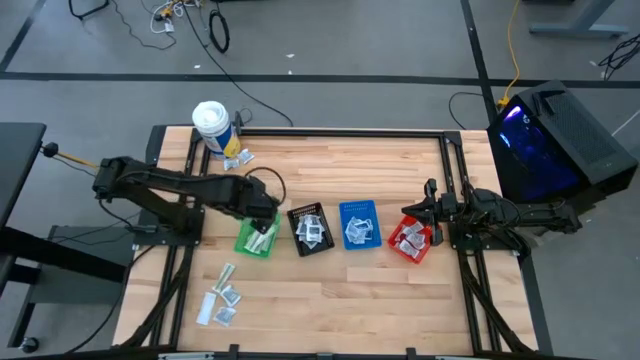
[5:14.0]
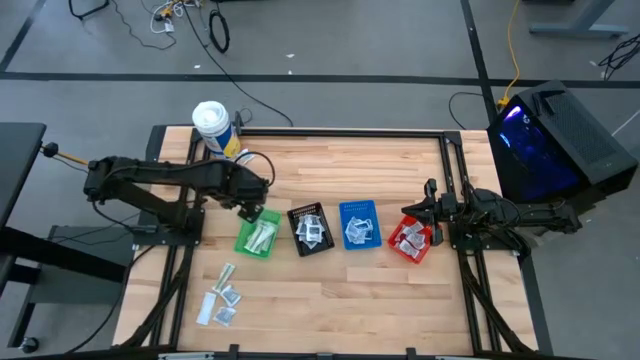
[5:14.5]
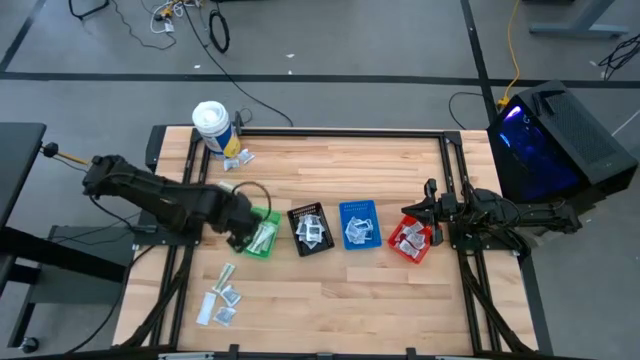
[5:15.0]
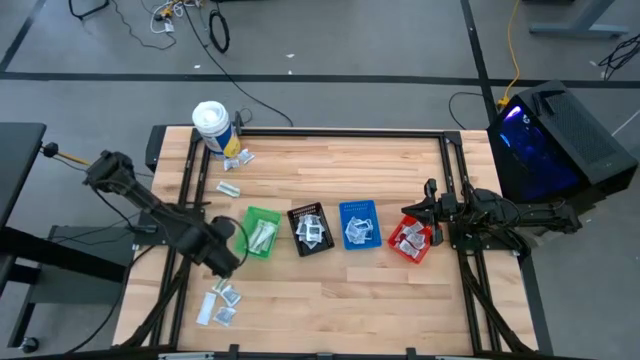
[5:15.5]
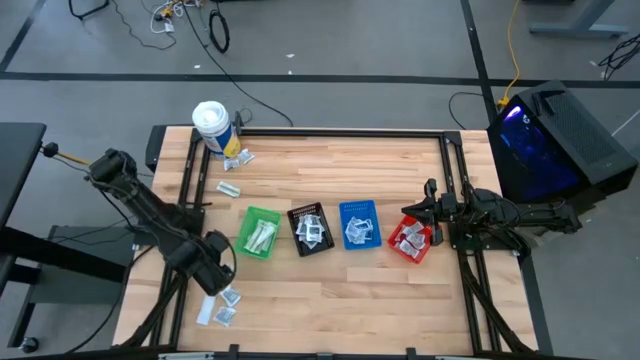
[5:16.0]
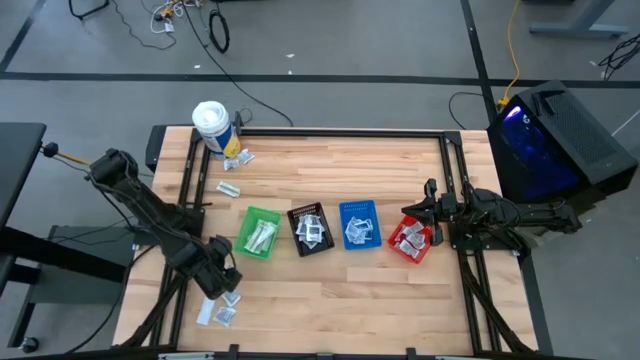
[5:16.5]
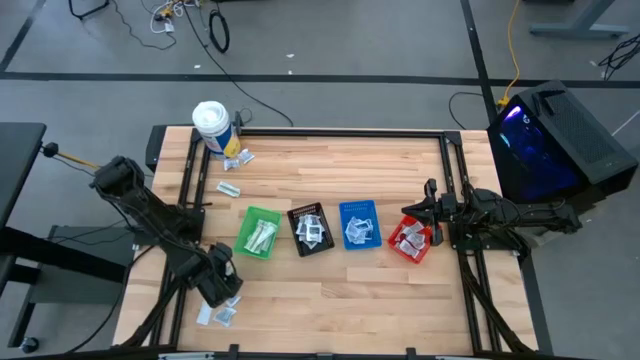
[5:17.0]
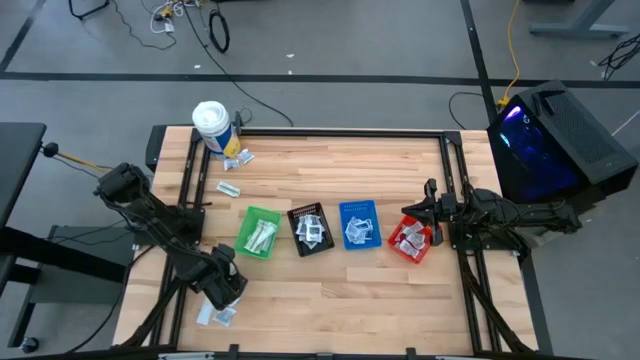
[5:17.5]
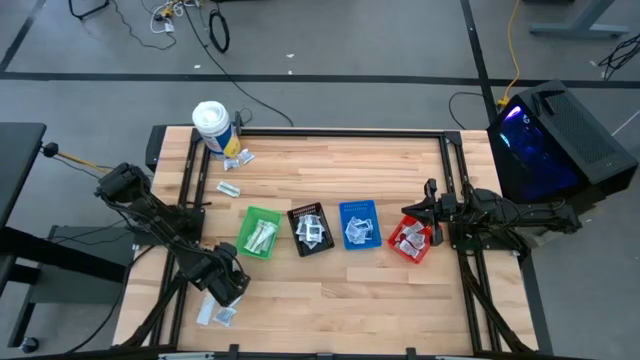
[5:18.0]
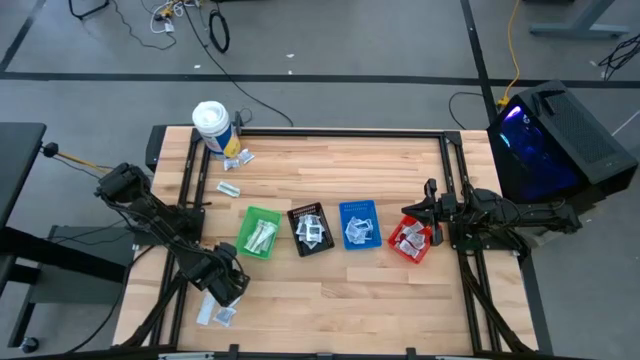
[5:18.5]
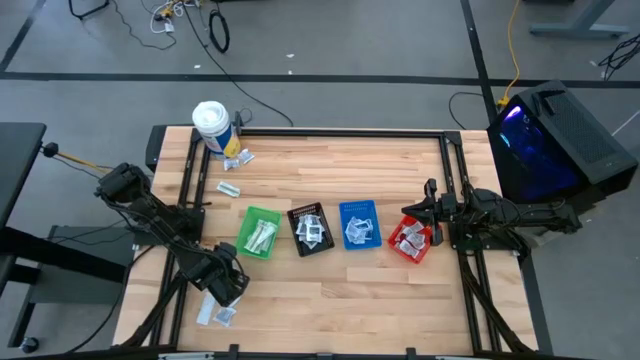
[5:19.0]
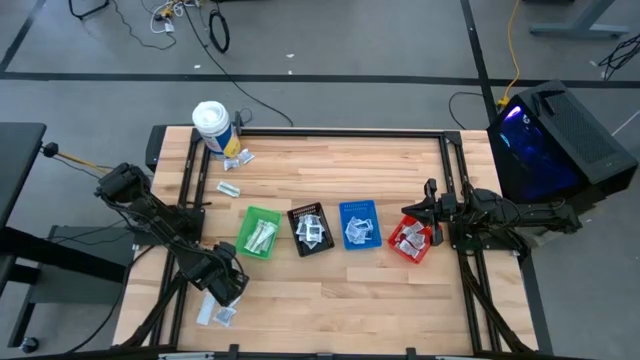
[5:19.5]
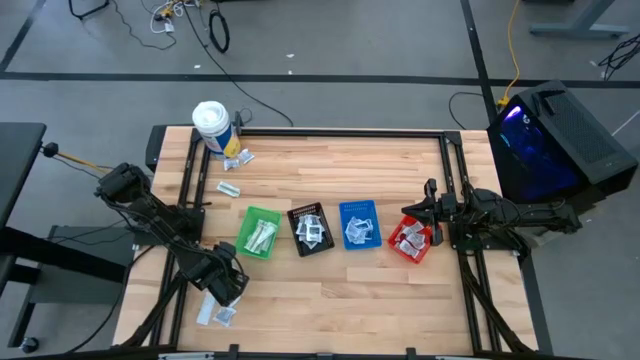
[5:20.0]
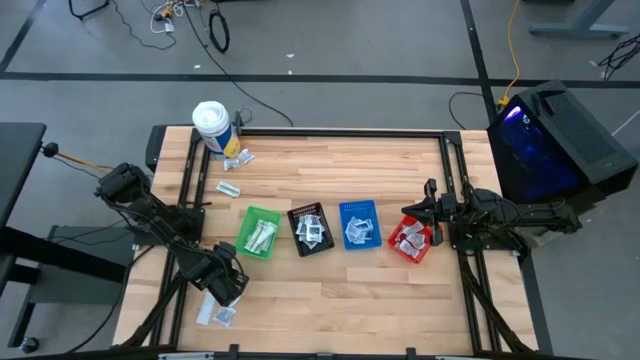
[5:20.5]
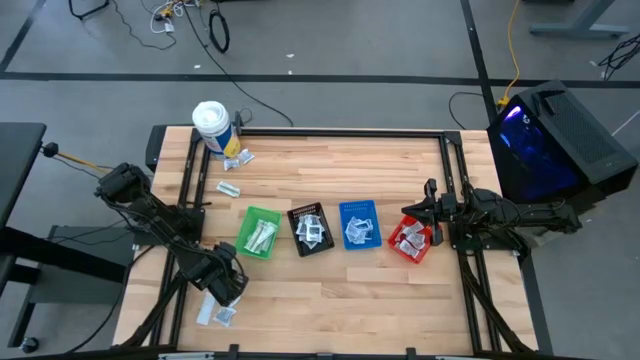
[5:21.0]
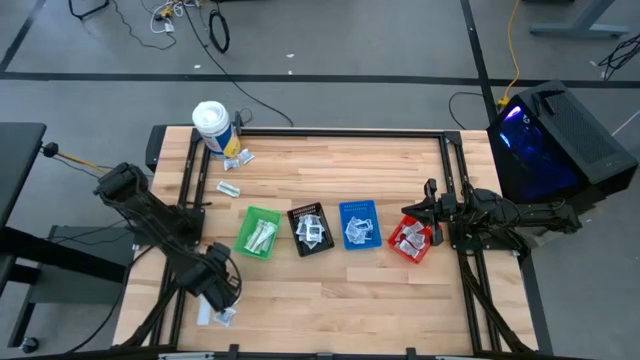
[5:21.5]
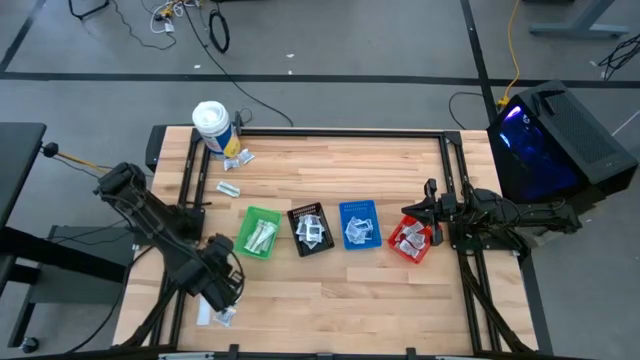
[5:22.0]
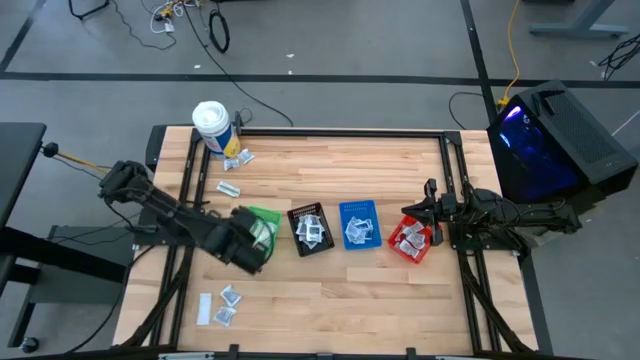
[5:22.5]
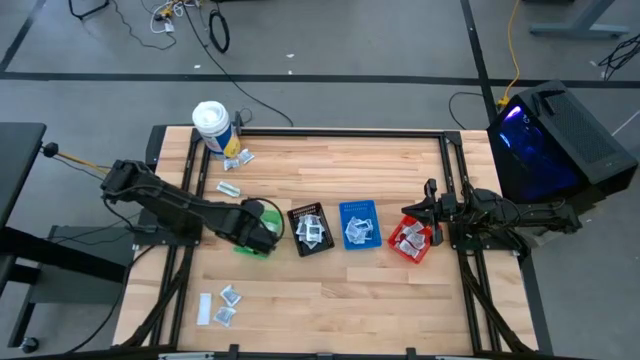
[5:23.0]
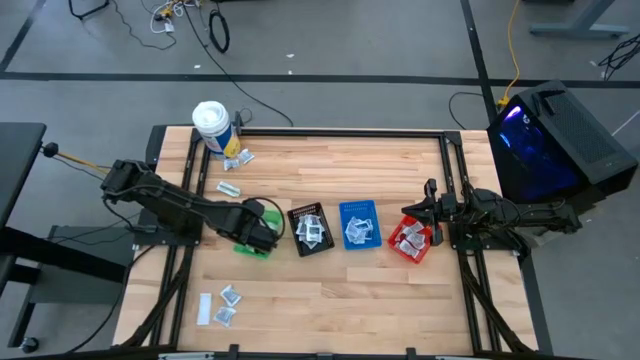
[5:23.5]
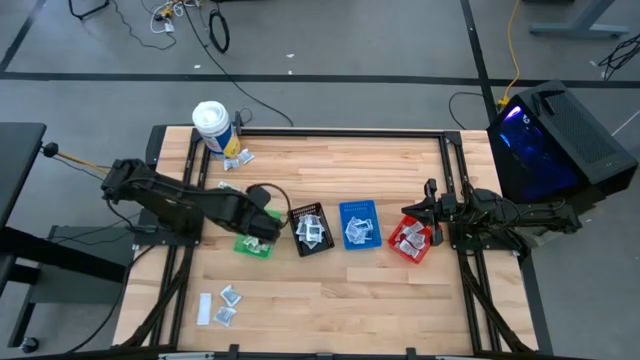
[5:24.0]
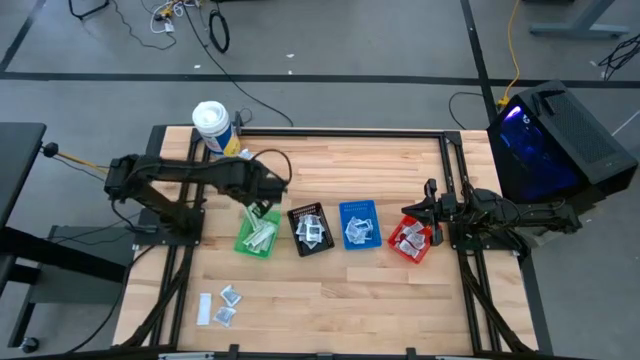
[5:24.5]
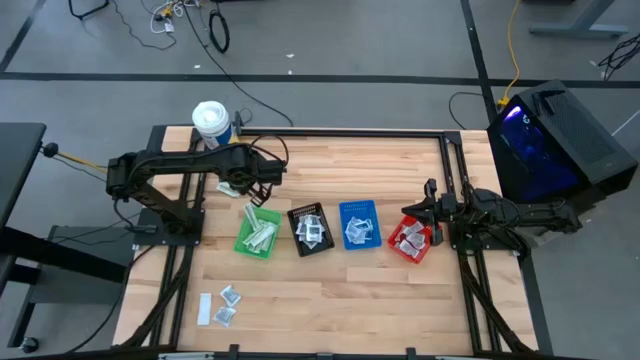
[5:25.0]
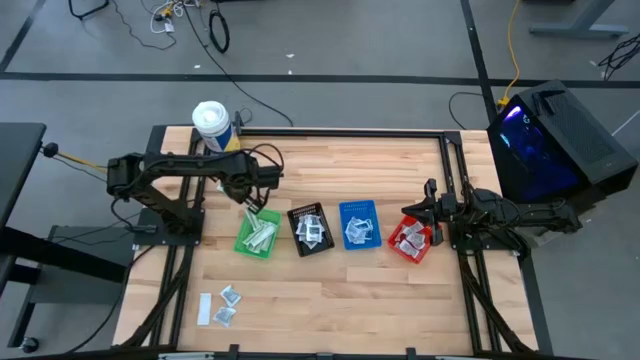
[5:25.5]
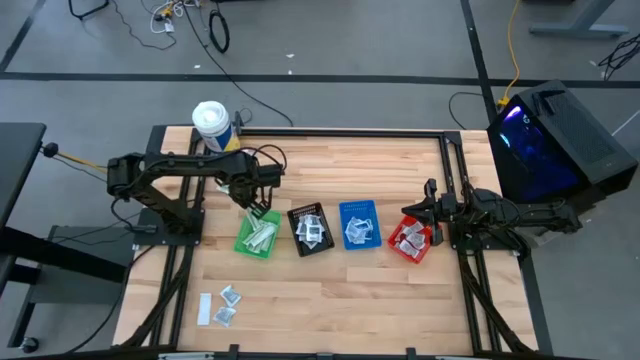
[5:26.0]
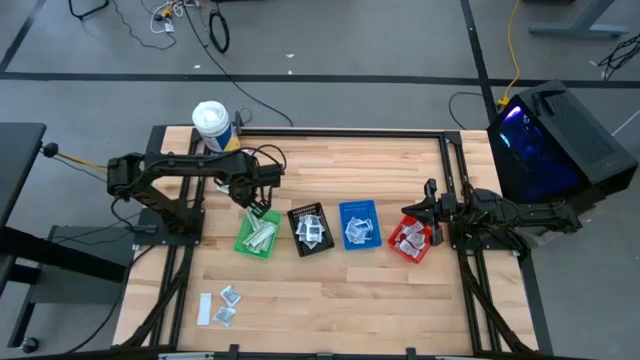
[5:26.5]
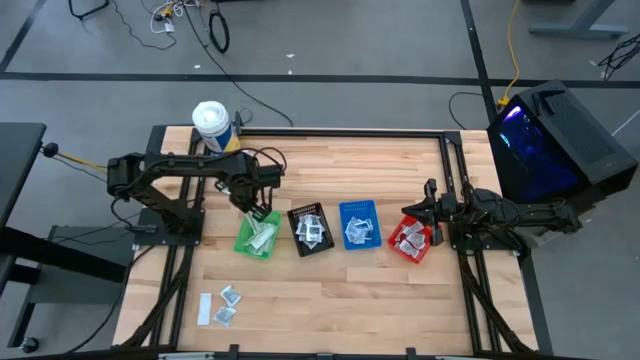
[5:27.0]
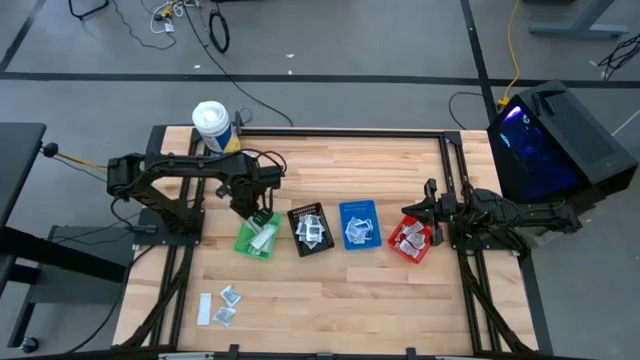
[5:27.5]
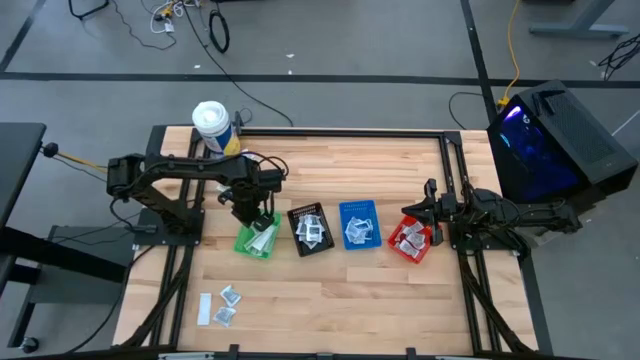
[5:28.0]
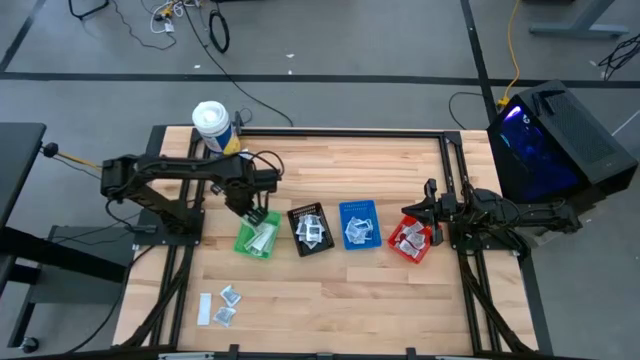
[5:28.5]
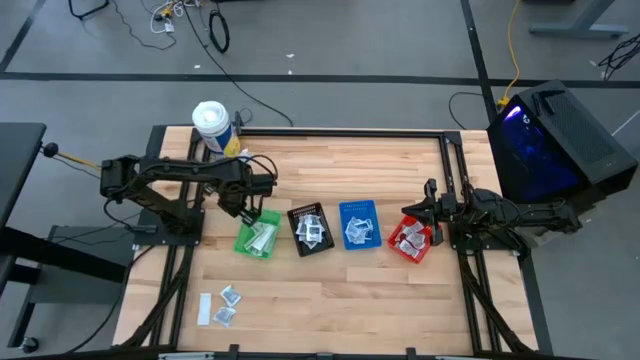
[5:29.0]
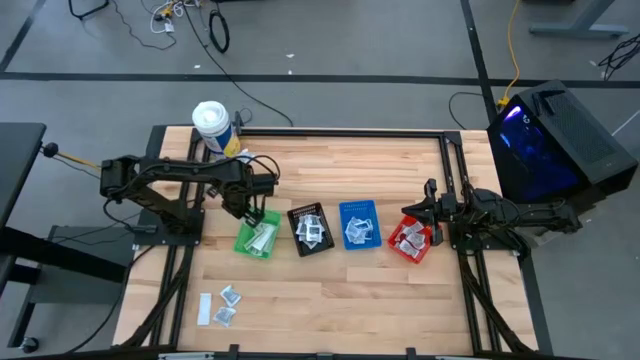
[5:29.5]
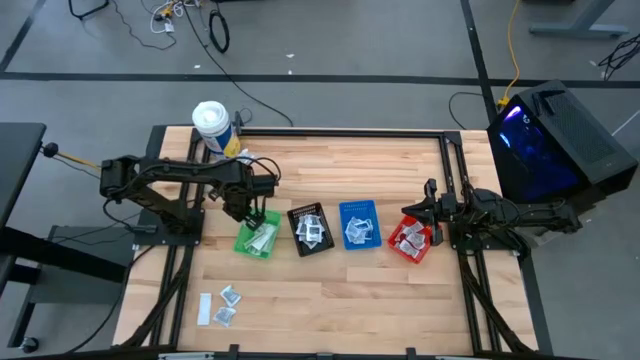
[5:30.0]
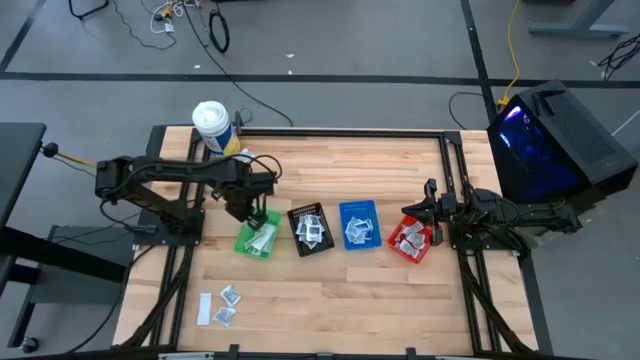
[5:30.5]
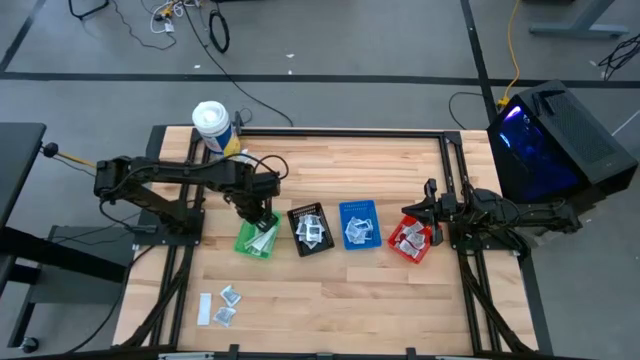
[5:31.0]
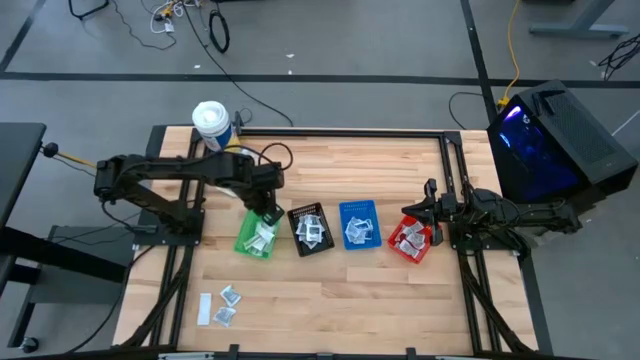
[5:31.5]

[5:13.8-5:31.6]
Task: Pick & Place First Aid Supplies
Put the bandage into the green basket
